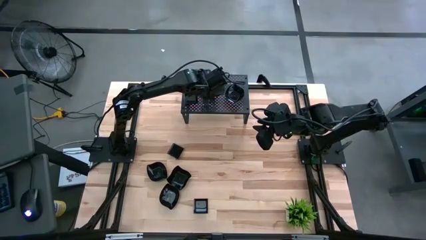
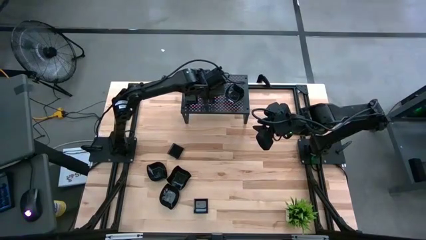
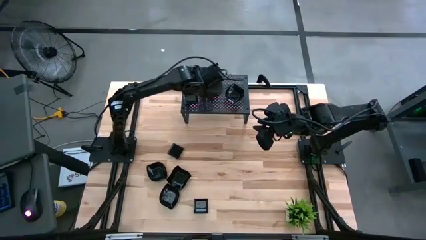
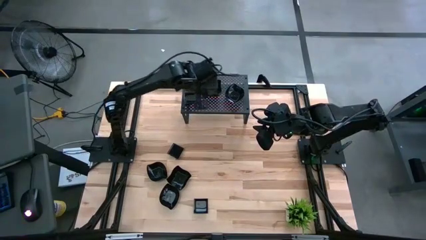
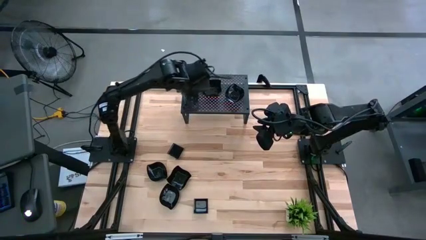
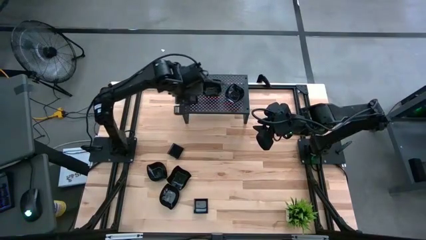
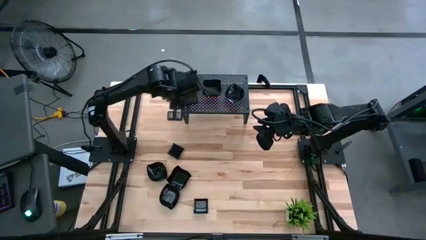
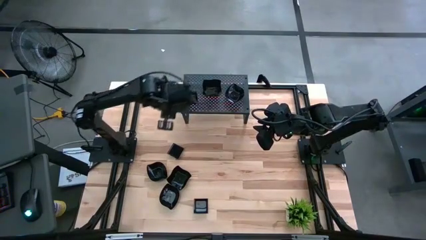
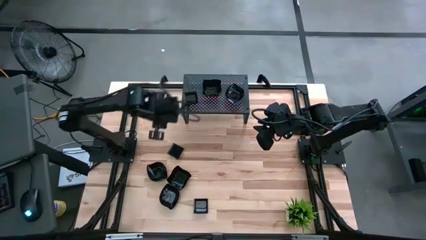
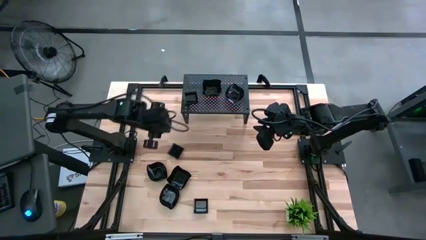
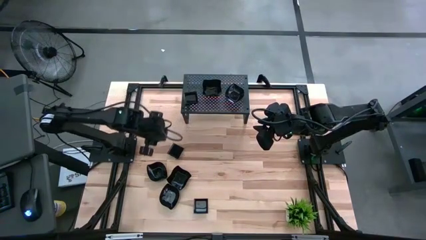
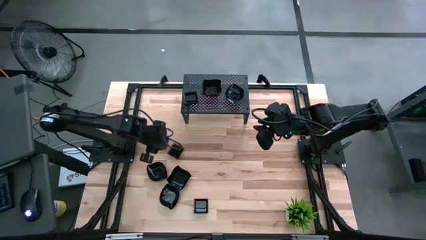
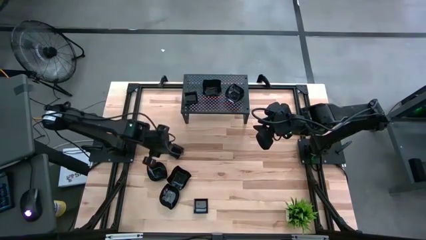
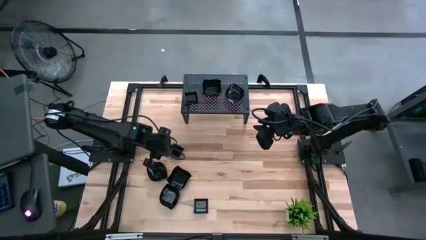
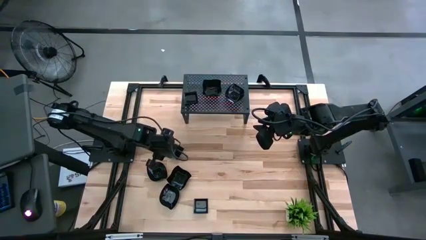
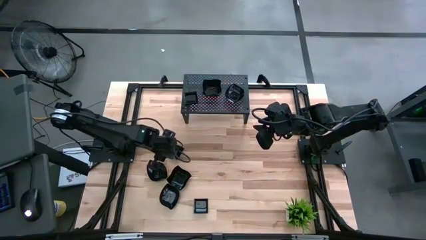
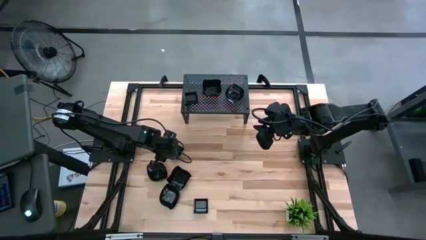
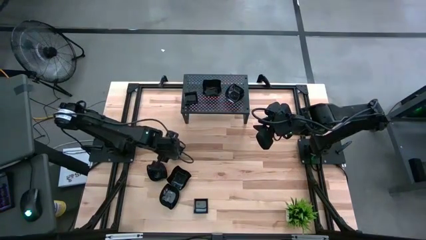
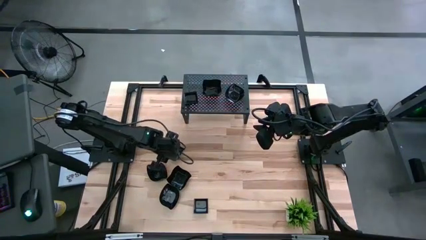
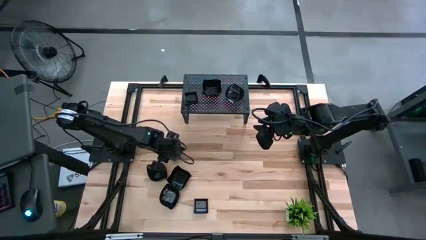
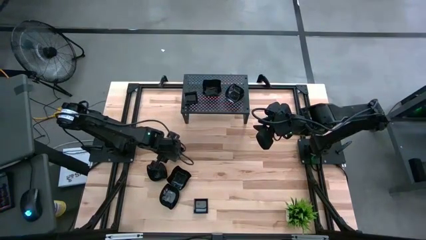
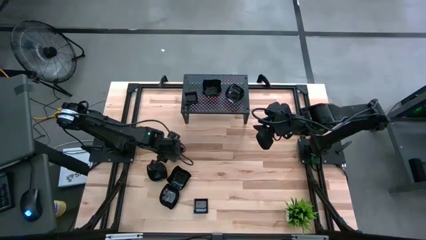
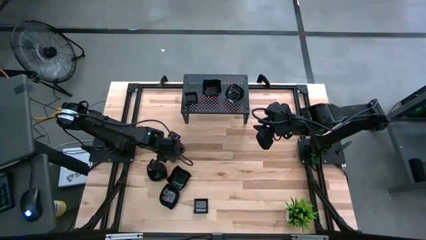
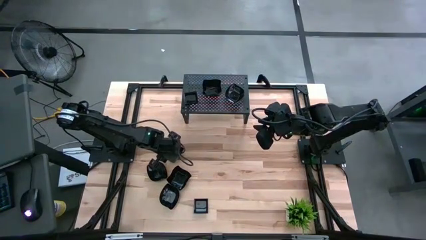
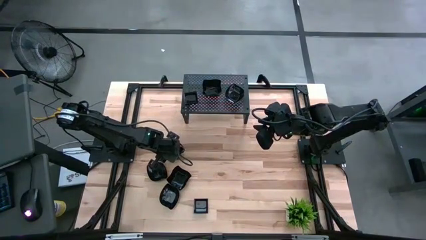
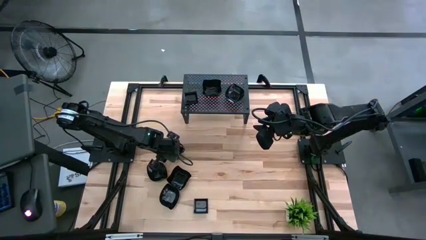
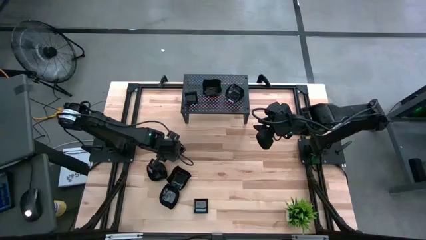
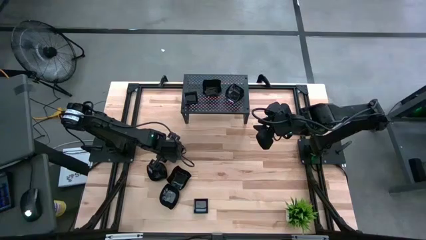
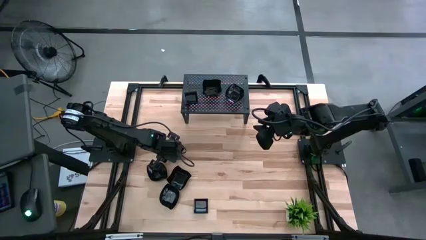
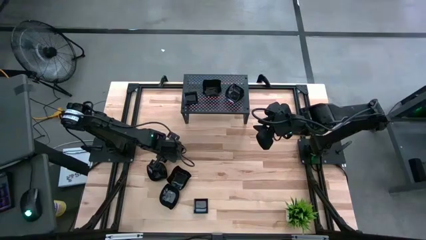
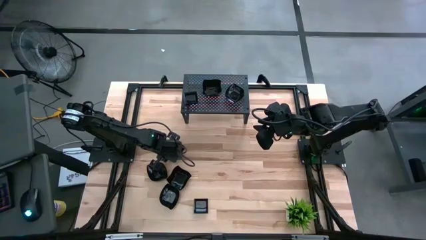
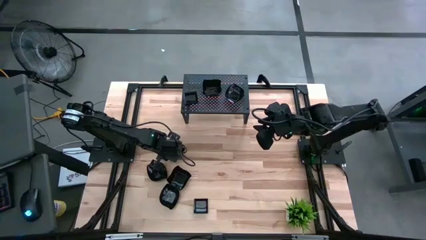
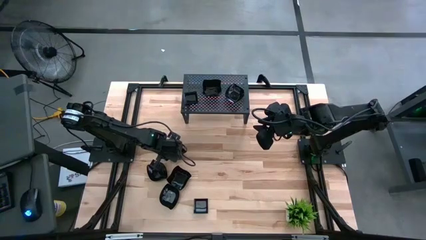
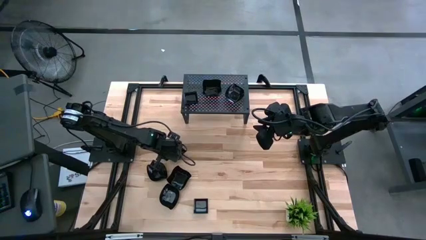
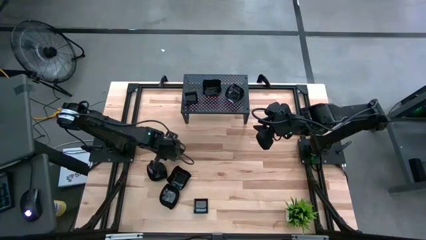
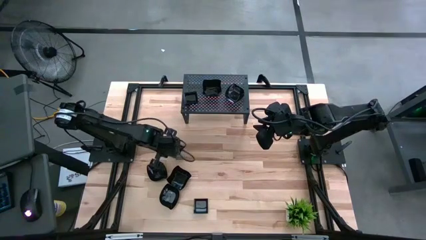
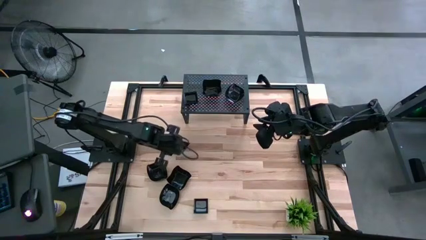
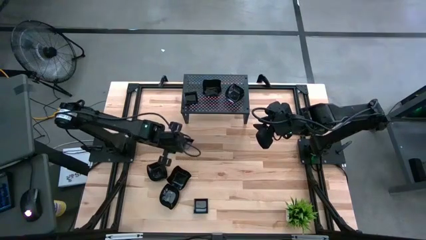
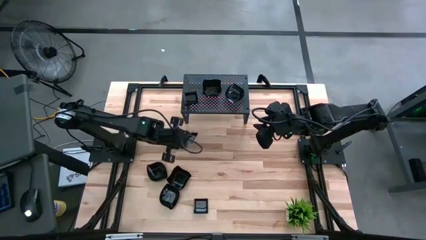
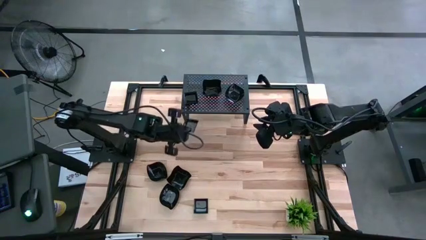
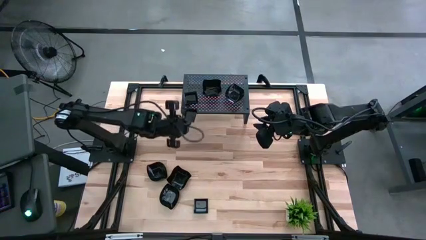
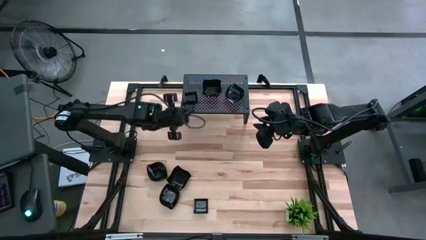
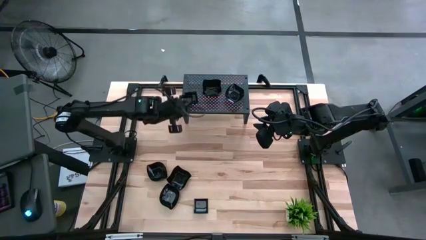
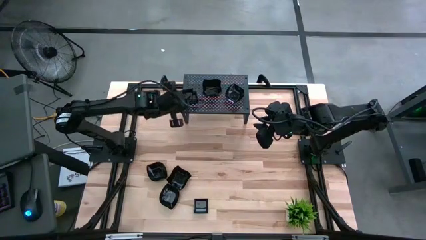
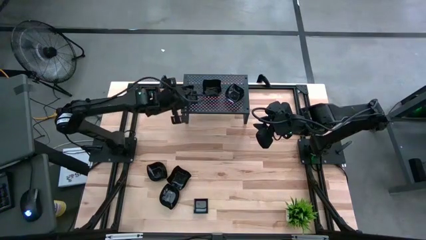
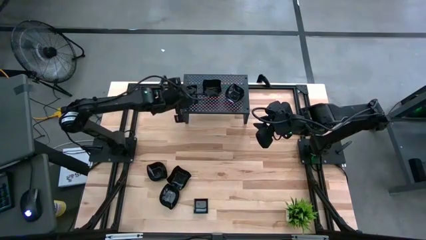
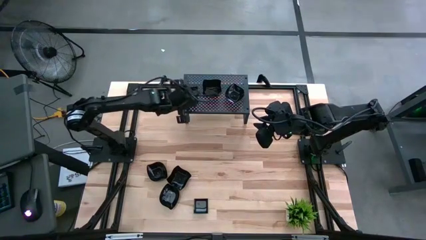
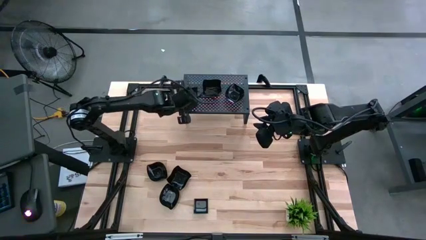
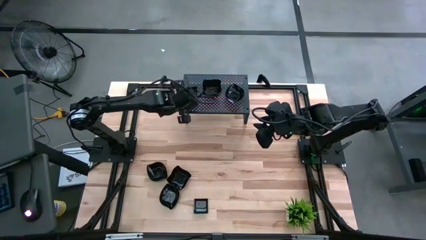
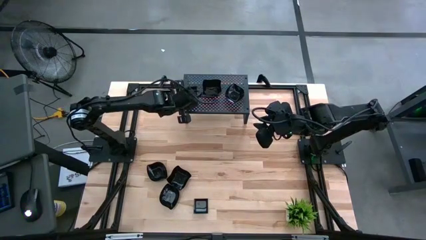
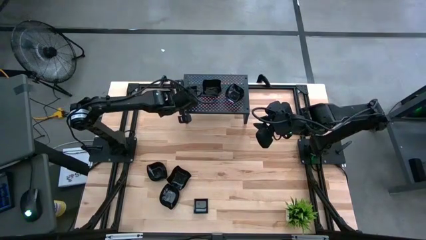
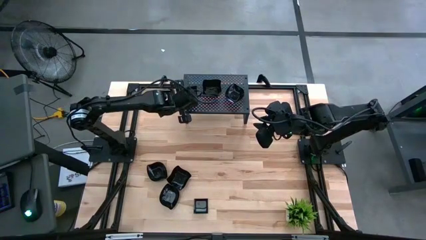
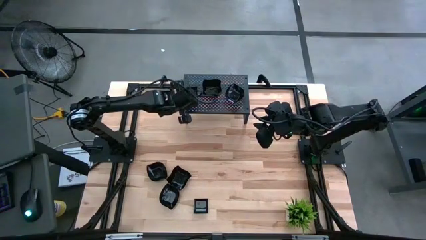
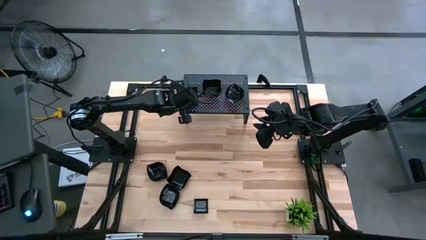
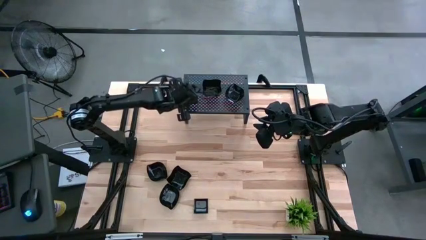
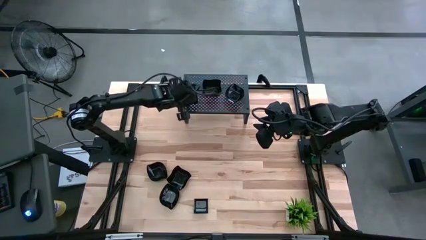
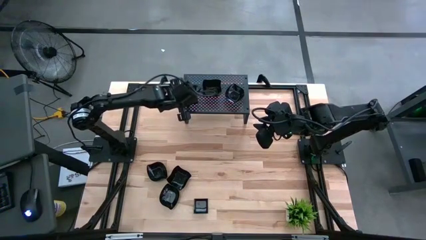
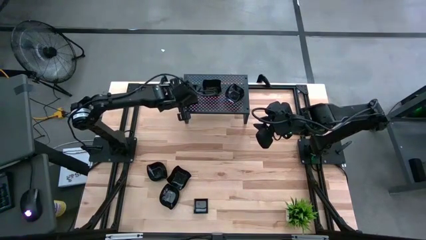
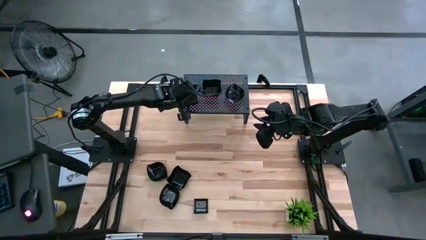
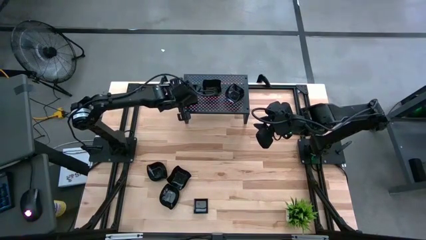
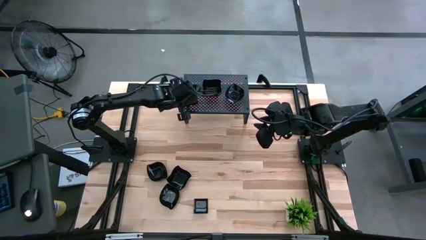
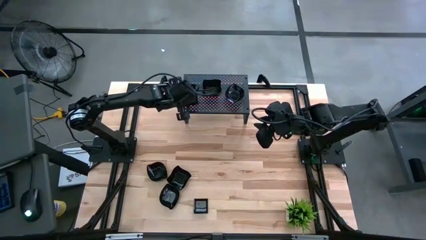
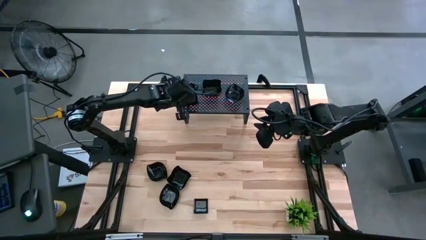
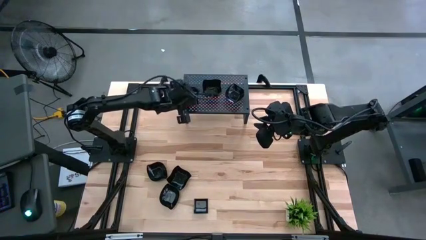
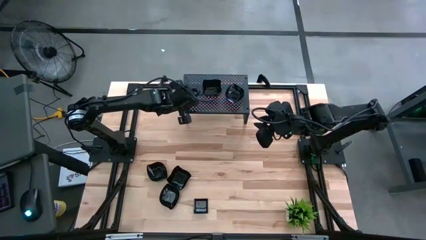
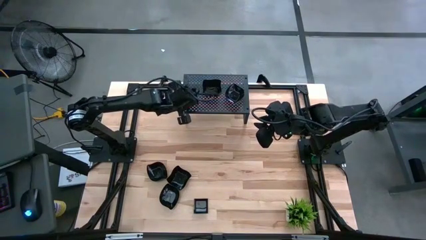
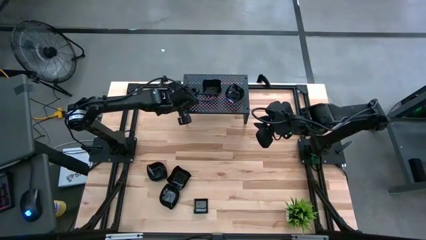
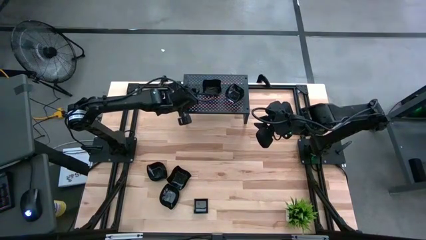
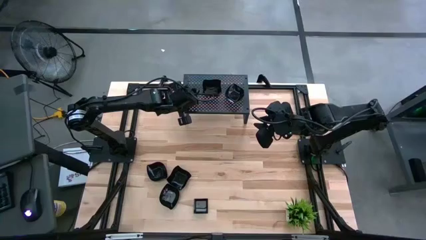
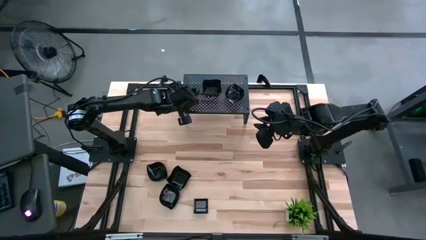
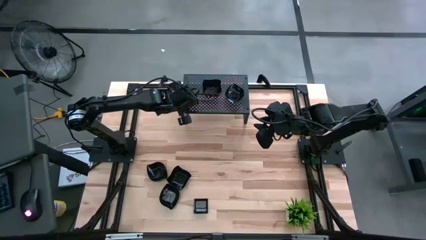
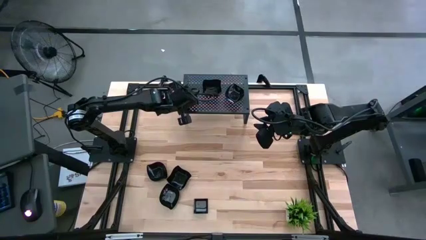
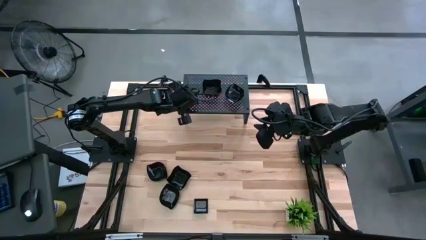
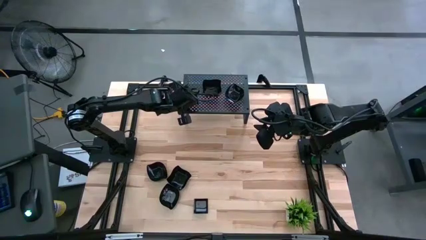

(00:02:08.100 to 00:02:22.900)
Task: Pick & Place Mini shaped plates
Stack the square plate on top of the square plate on the shelf
